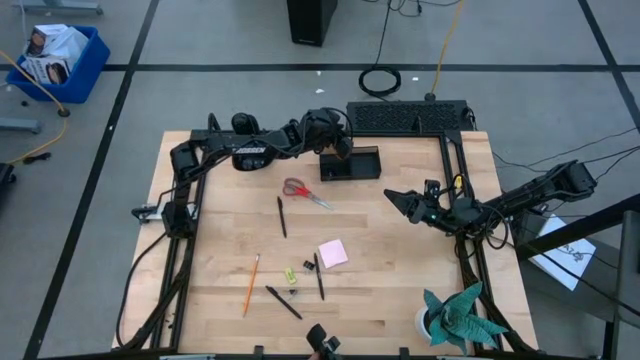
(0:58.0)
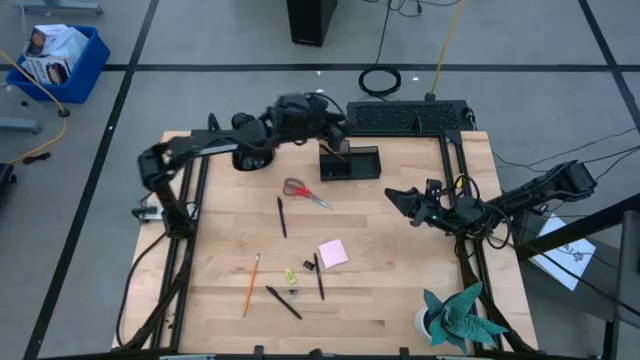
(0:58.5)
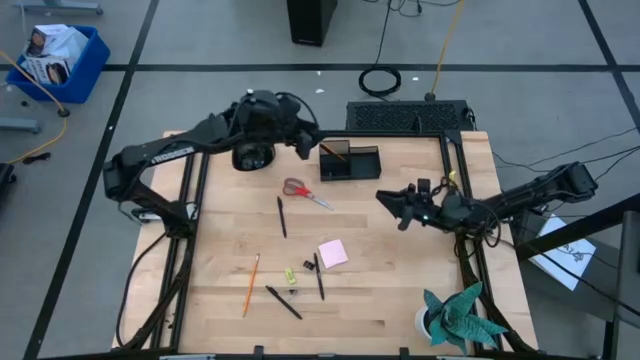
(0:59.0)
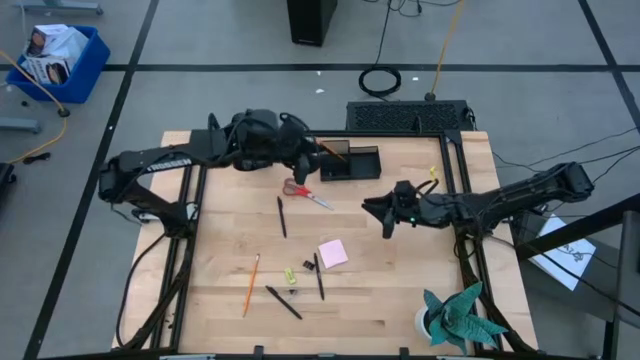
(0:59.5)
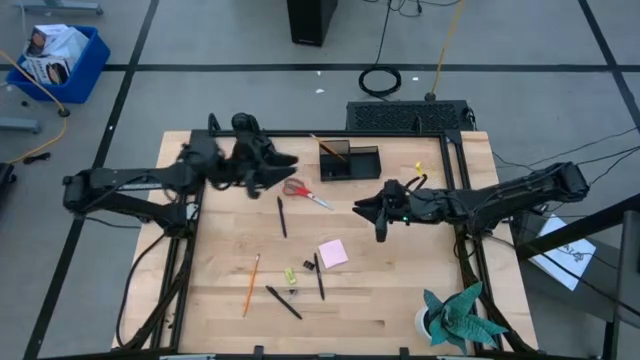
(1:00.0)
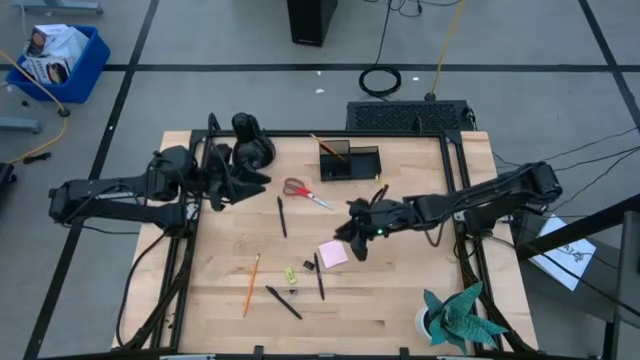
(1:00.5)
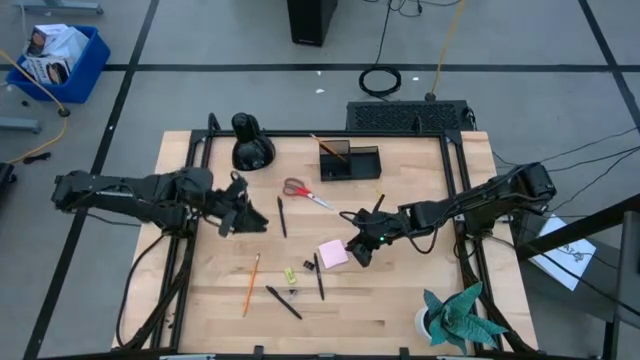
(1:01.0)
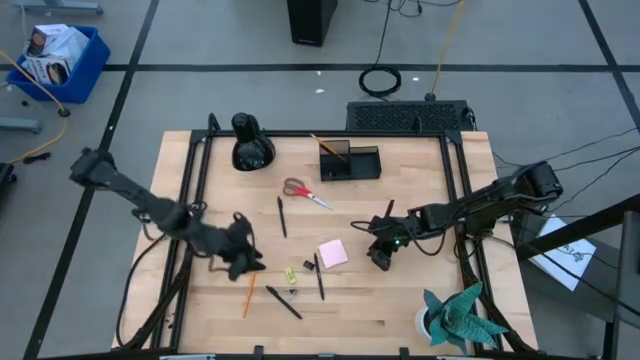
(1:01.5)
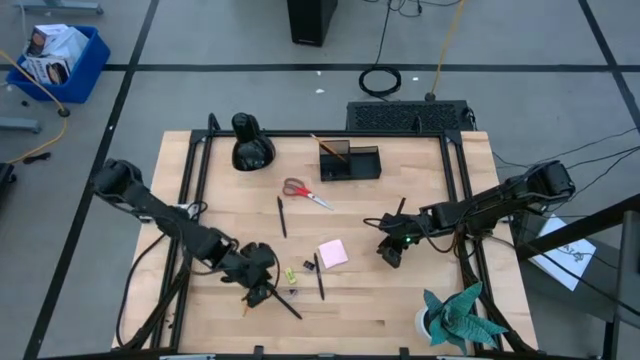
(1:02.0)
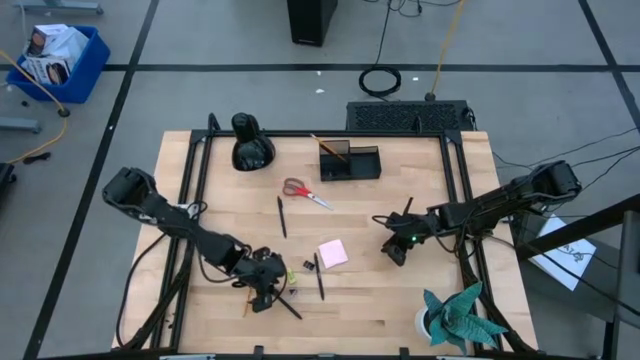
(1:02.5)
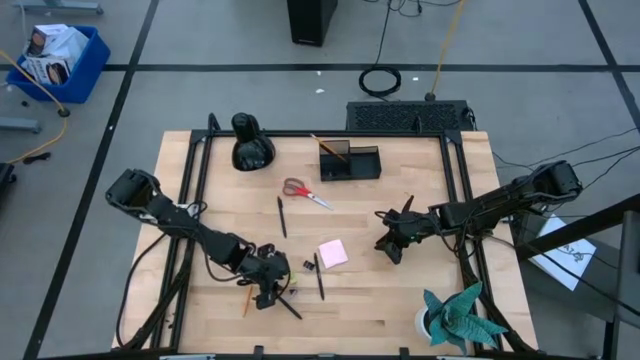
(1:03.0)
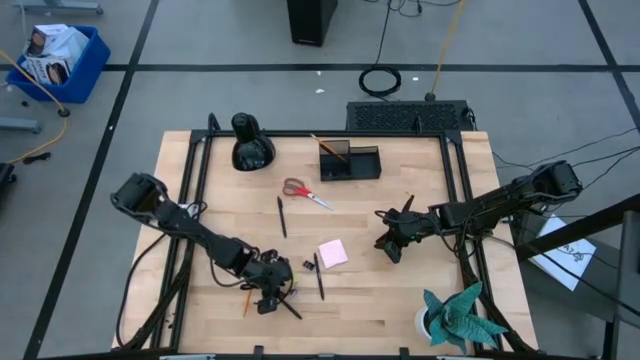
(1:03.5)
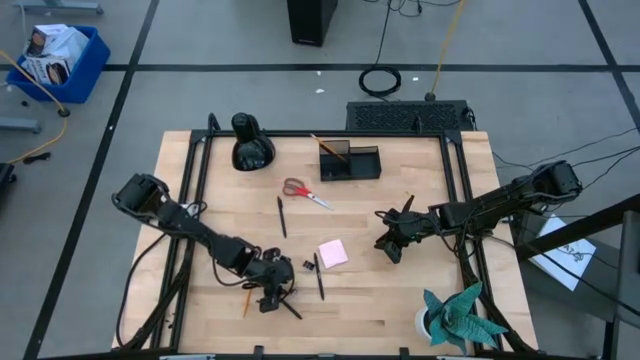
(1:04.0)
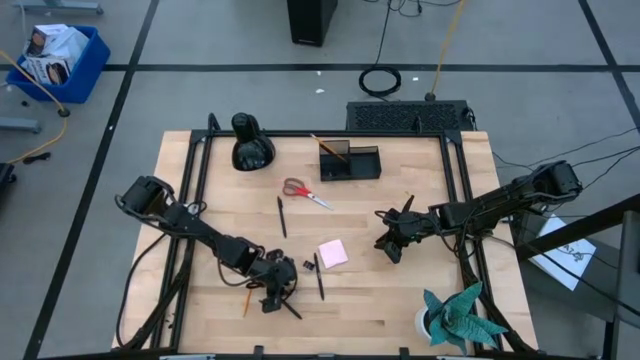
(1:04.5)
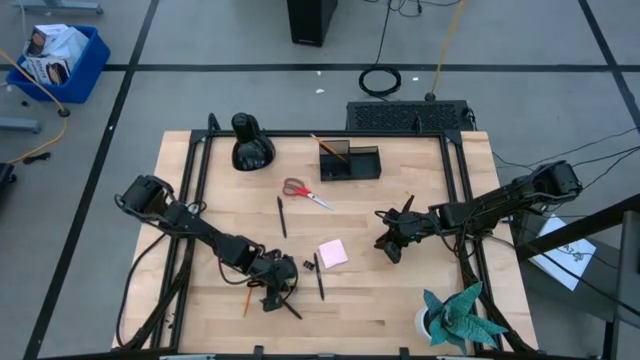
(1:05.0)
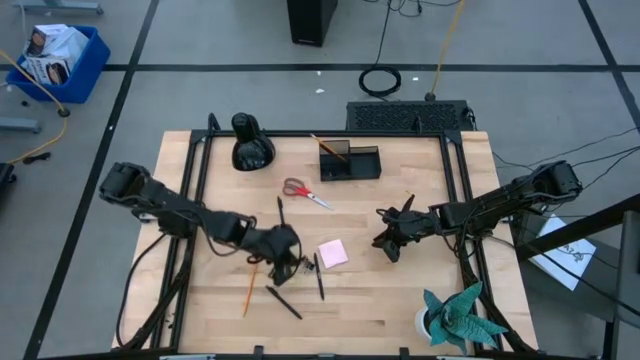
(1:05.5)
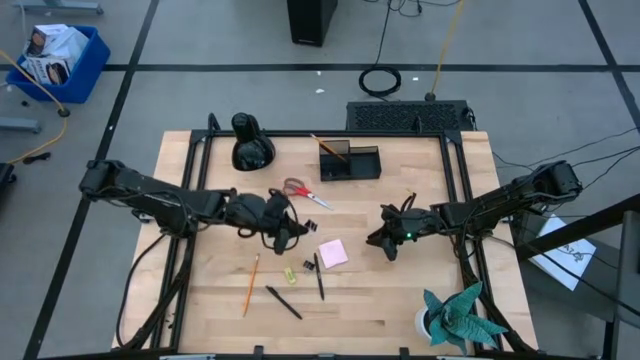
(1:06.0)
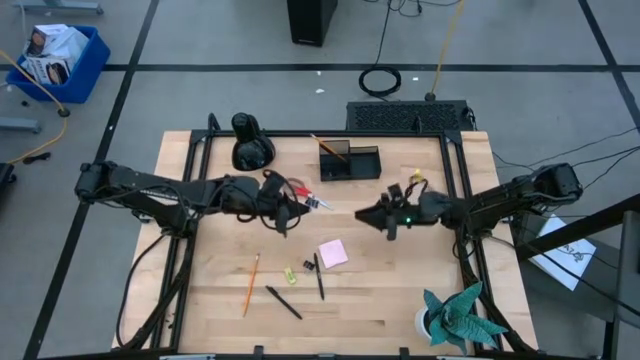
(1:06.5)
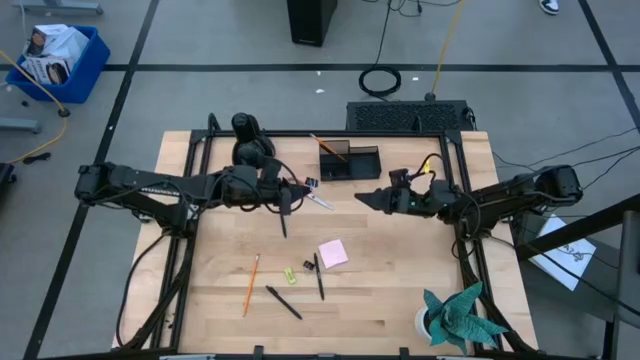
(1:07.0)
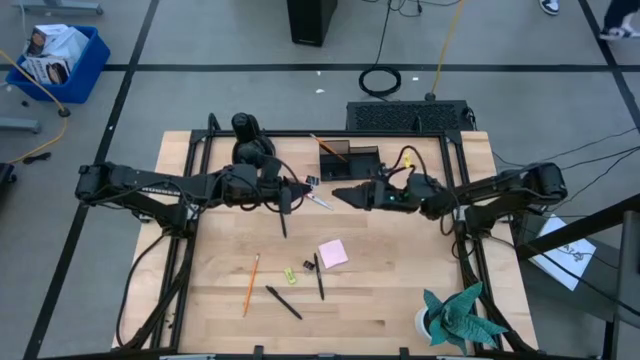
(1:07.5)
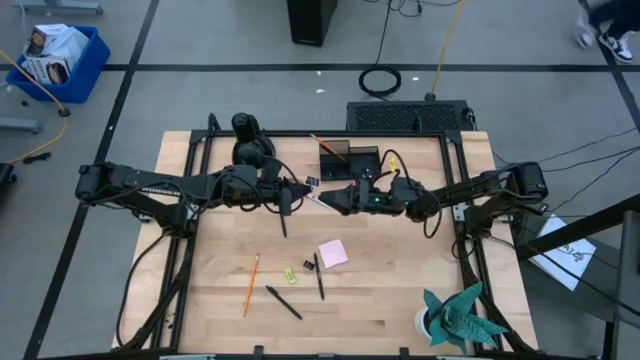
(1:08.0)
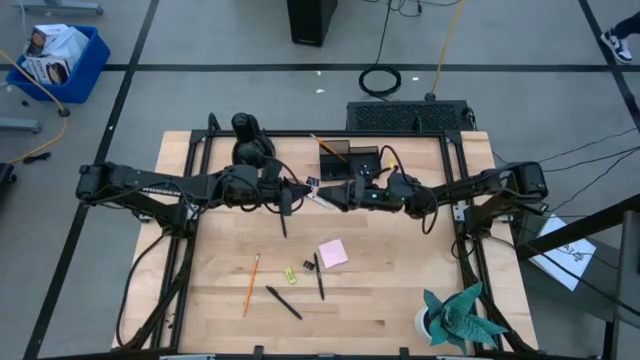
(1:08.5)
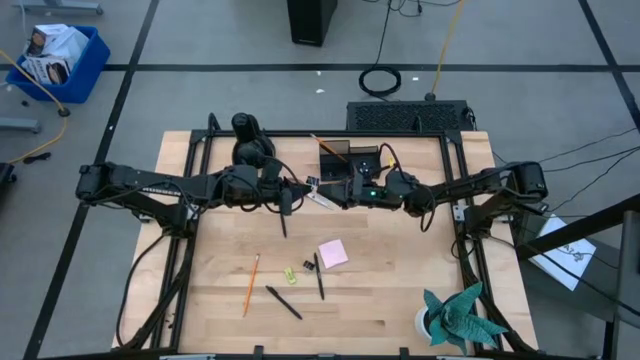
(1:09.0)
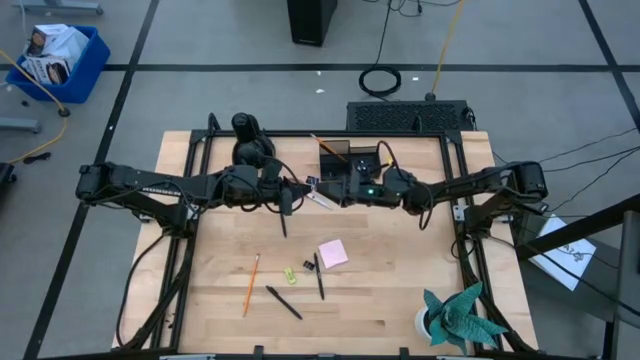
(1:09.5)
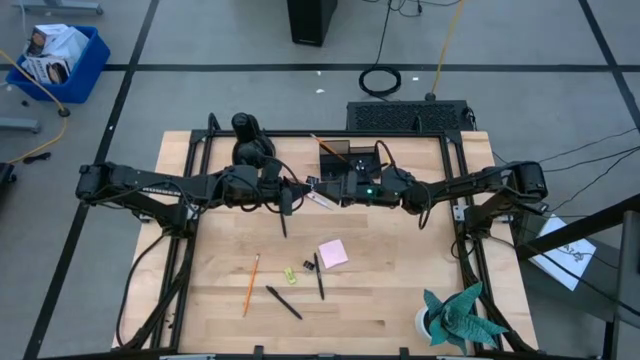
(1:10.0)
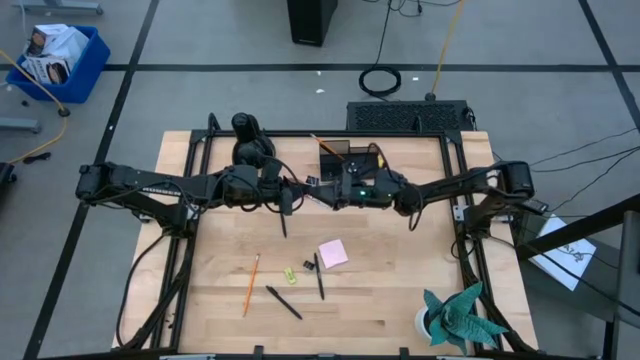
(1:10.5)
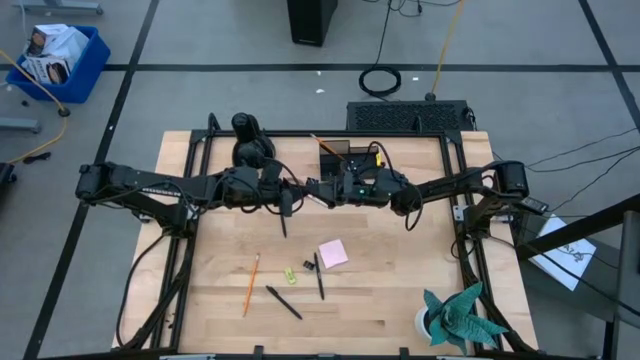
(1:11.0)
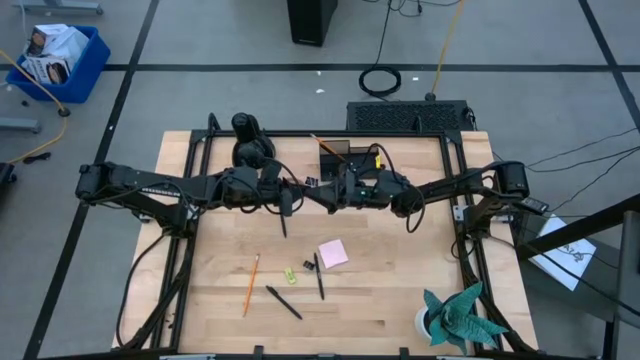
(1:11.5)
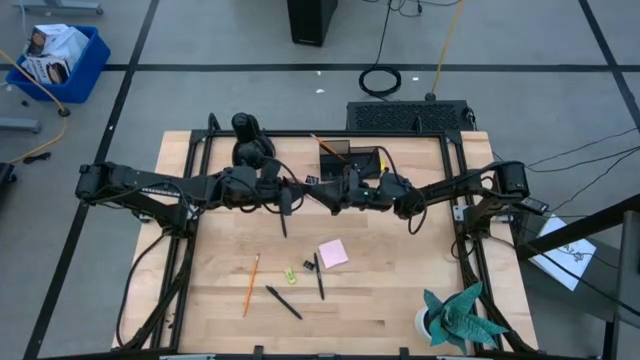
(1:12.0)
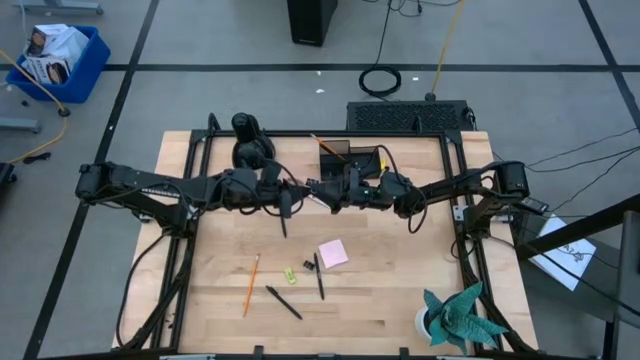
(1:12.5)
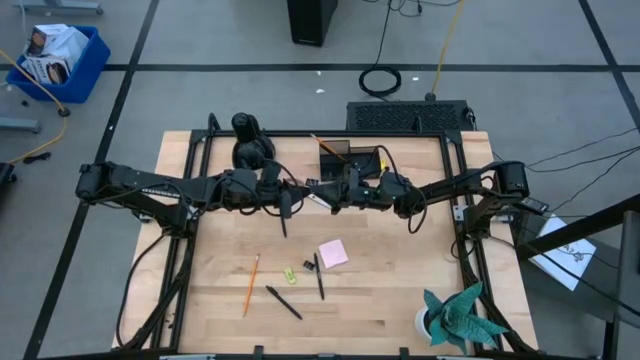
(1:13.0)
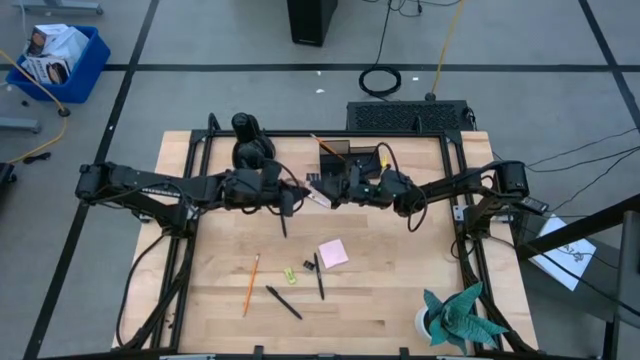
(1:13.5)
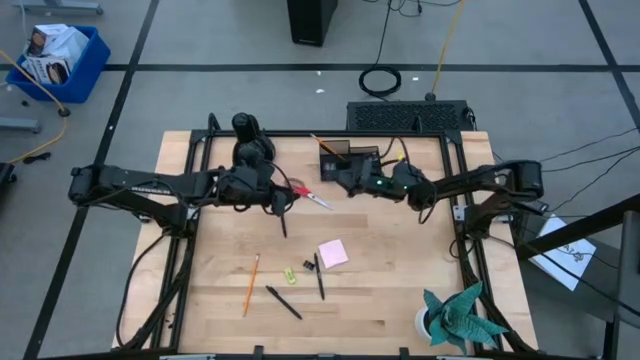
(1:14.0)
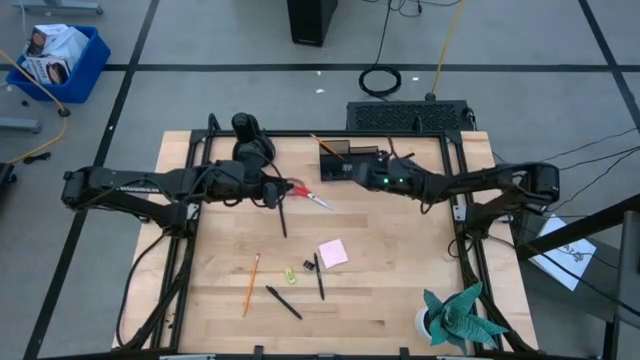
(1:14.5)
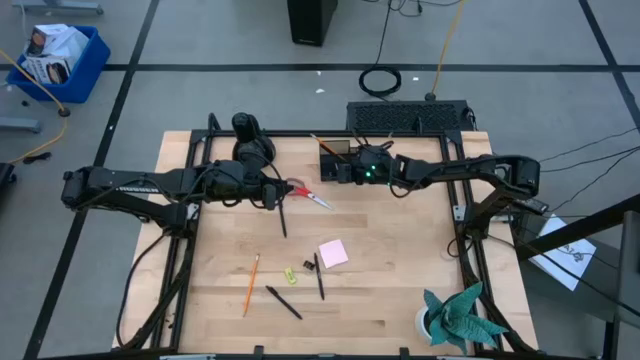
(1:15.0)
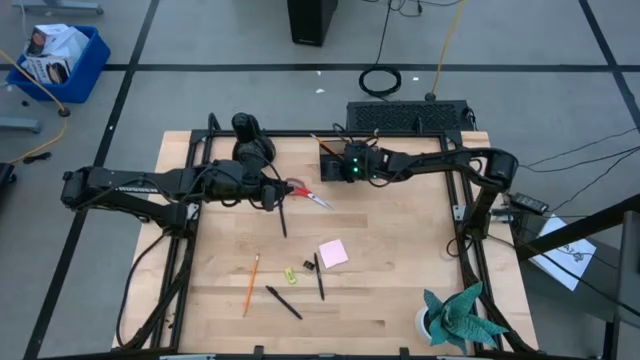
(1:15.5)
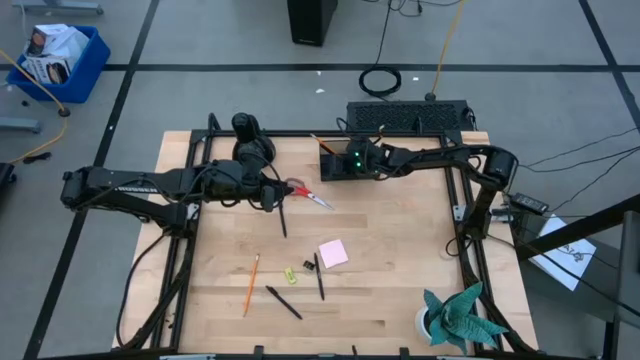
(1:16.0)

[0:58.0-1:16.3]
Task: Pick and place office supplies into organizer
Put the black binder clip into the black desk organizer

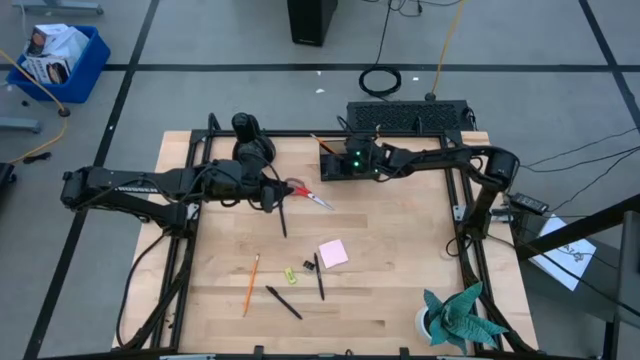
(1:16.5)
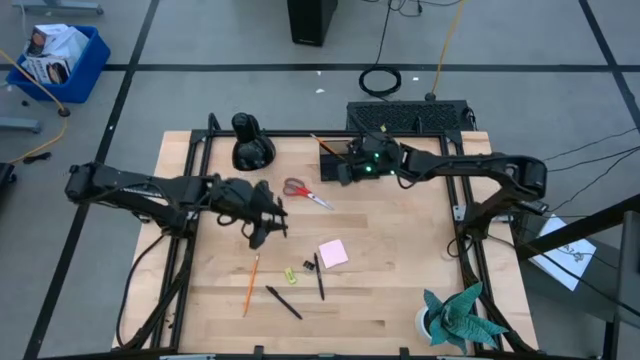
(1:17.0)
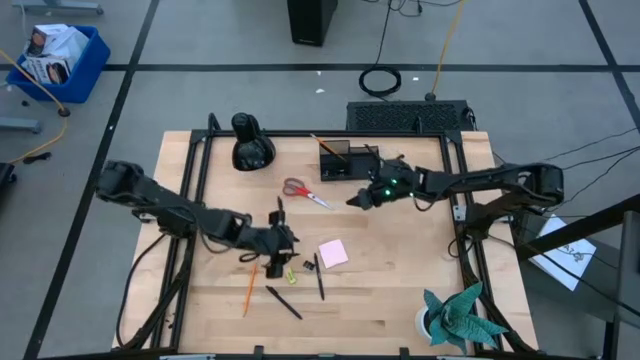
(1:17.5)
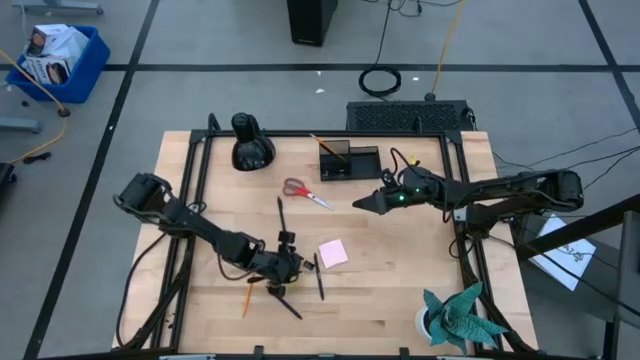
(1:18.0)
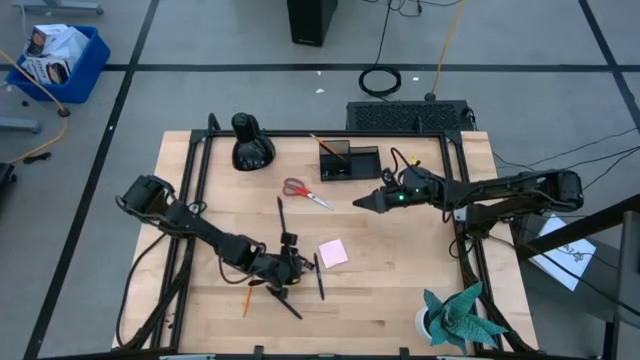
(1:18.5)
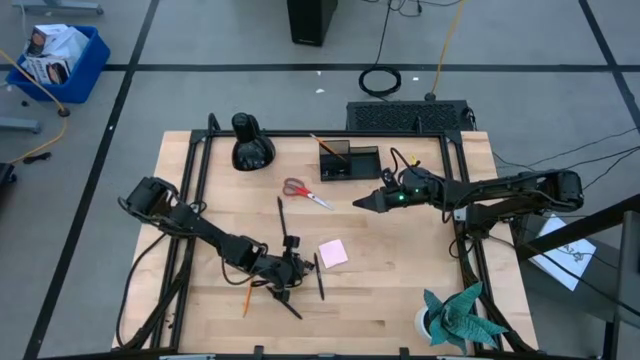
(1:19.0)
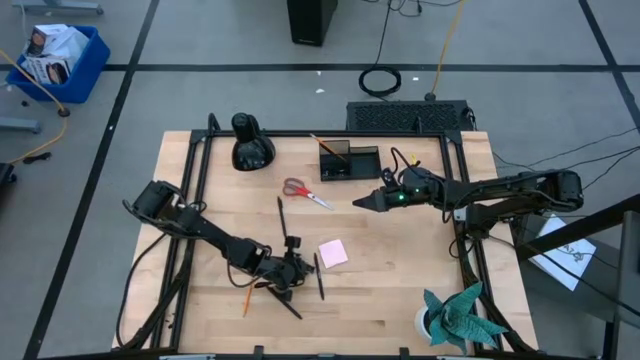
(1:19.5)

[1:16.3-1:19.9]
Put the black binder clip into the black desk organizer
